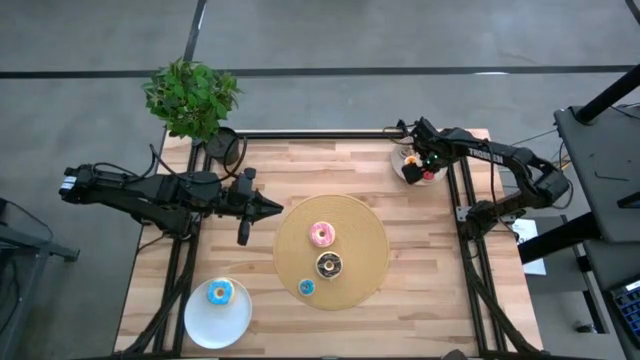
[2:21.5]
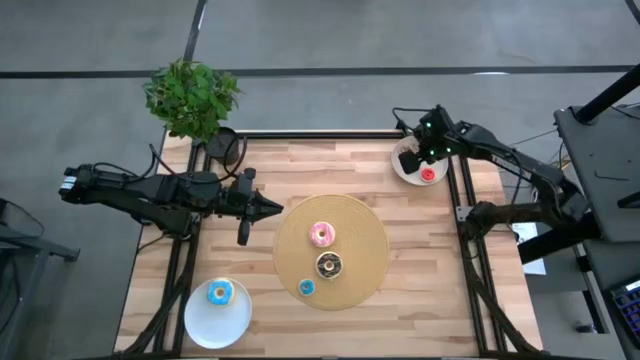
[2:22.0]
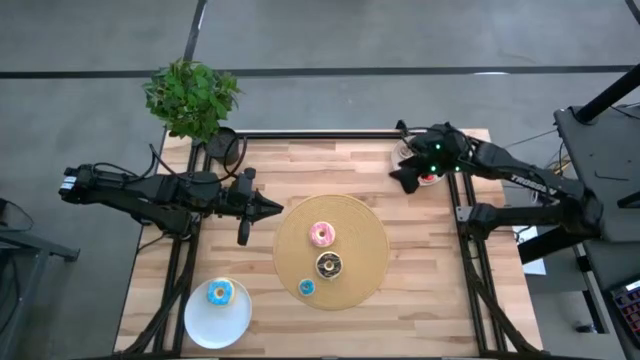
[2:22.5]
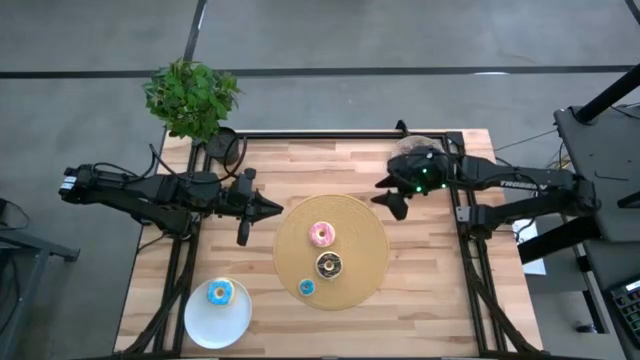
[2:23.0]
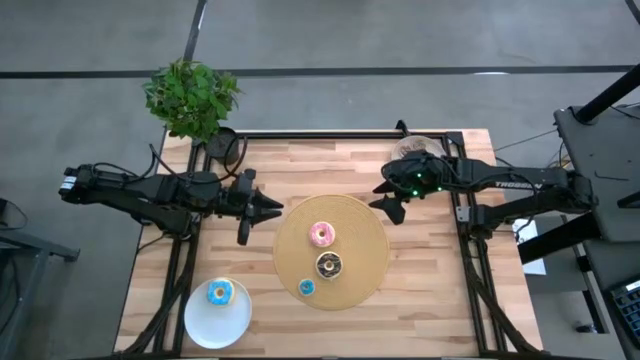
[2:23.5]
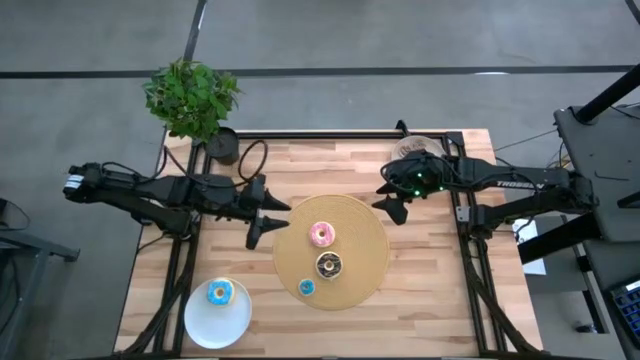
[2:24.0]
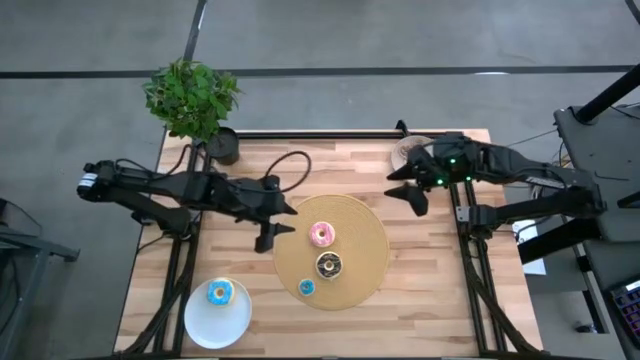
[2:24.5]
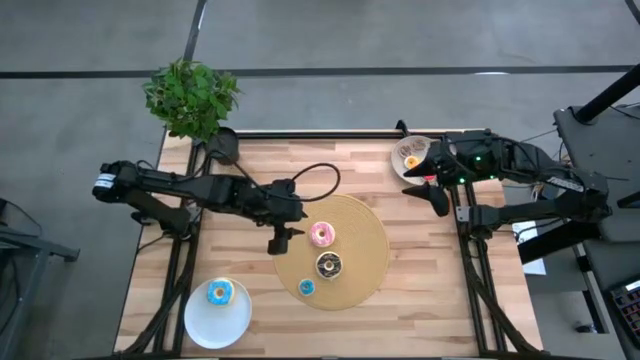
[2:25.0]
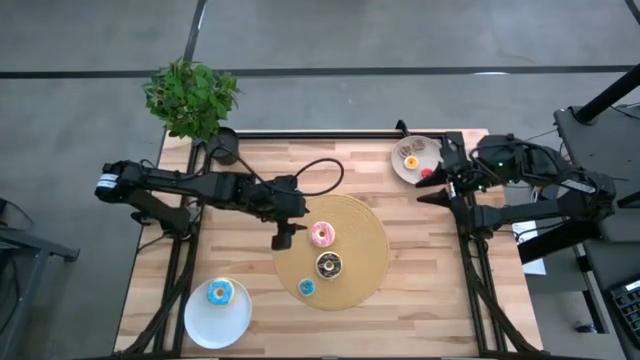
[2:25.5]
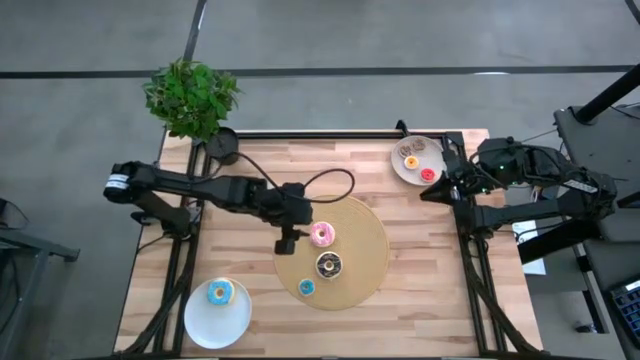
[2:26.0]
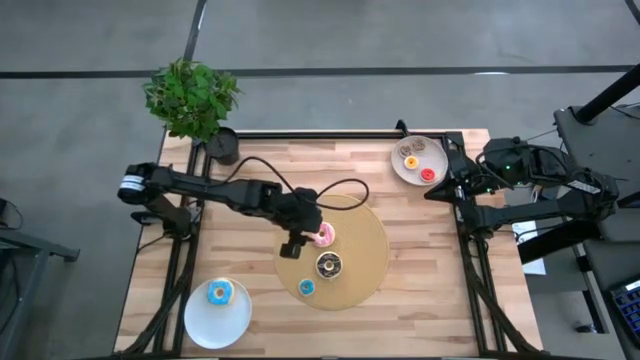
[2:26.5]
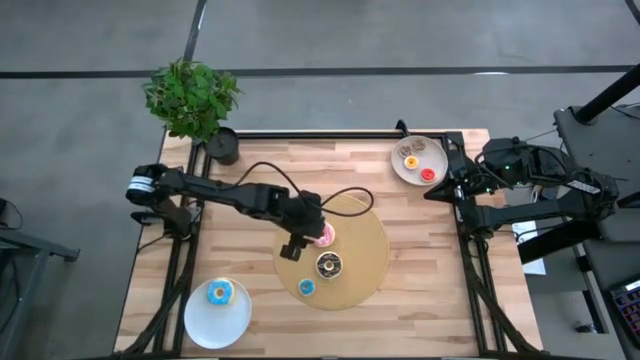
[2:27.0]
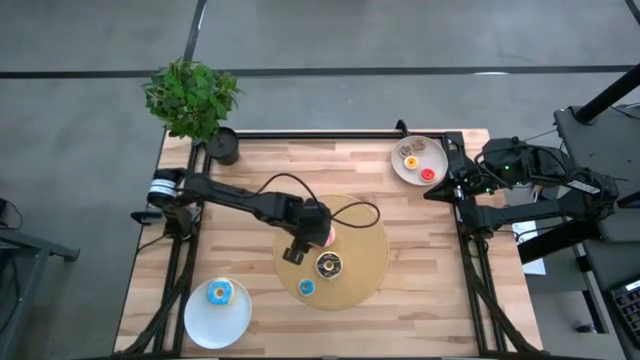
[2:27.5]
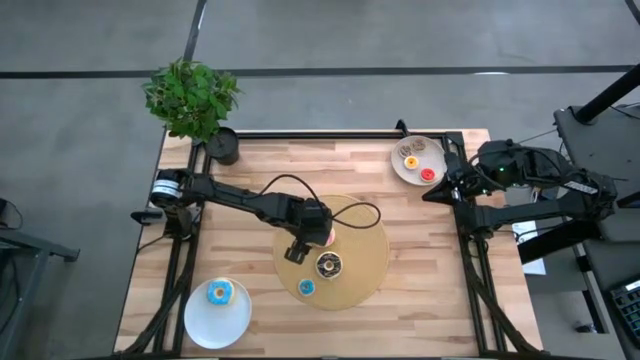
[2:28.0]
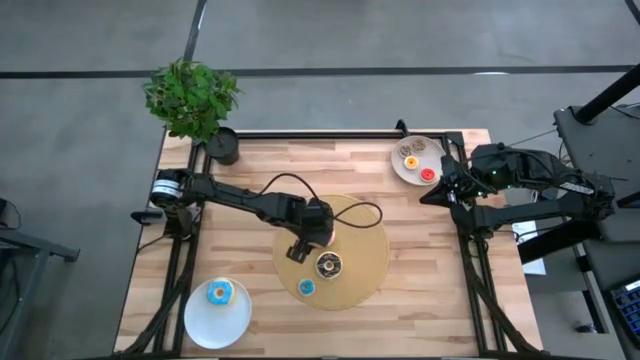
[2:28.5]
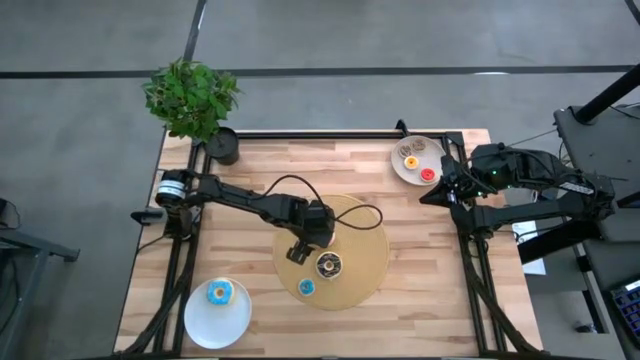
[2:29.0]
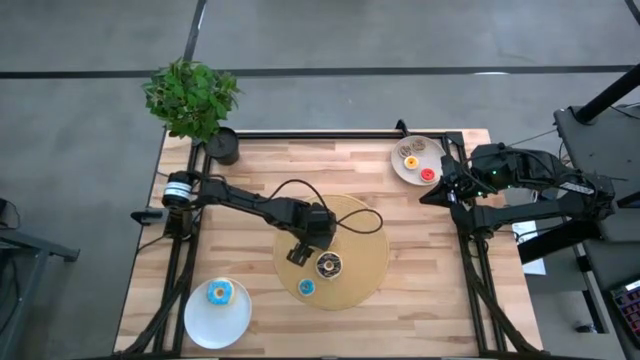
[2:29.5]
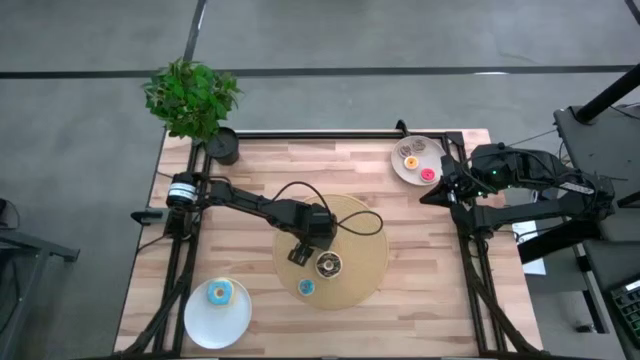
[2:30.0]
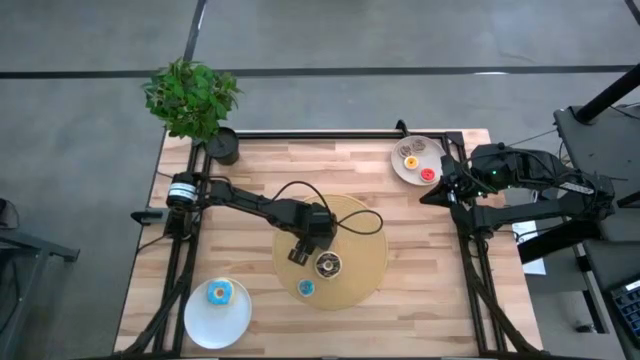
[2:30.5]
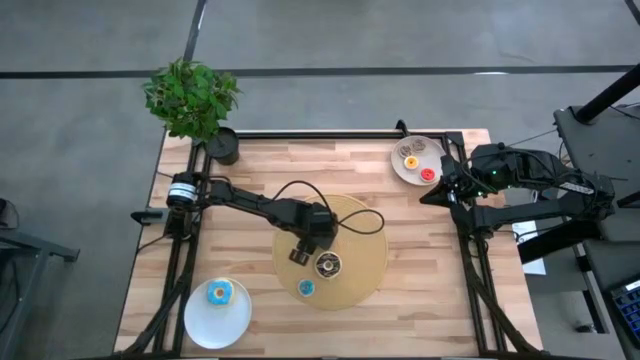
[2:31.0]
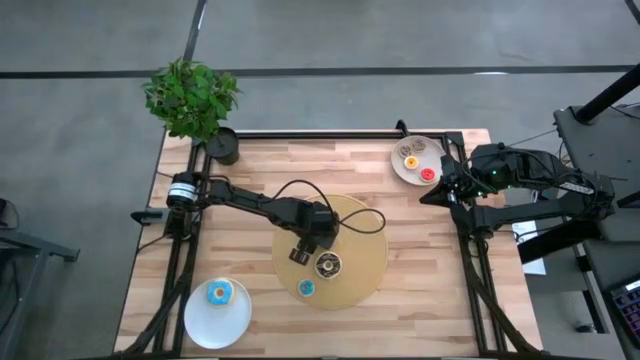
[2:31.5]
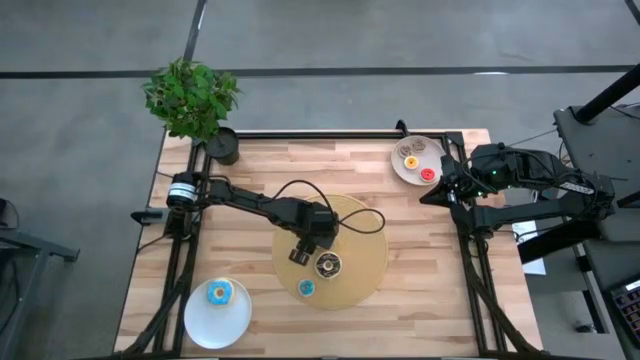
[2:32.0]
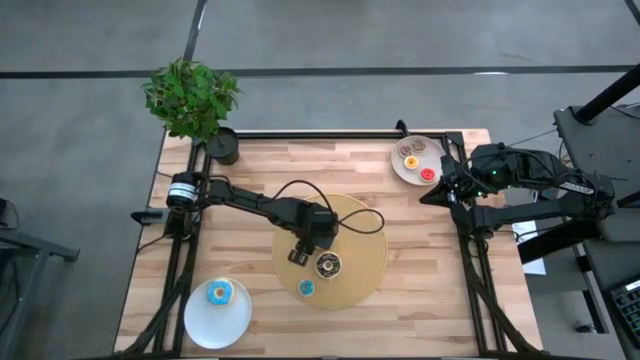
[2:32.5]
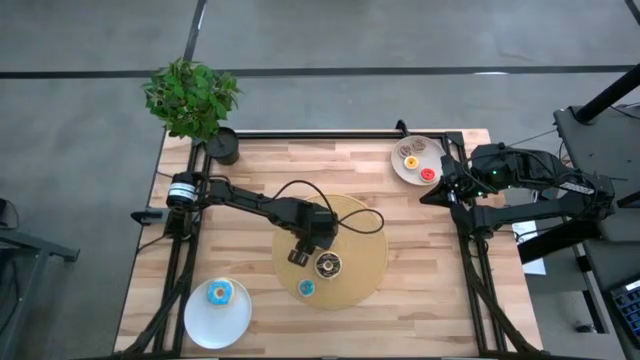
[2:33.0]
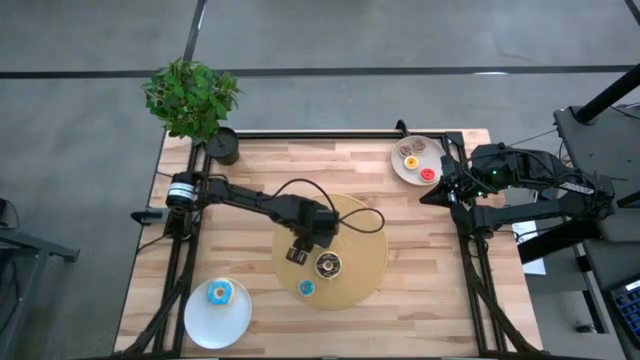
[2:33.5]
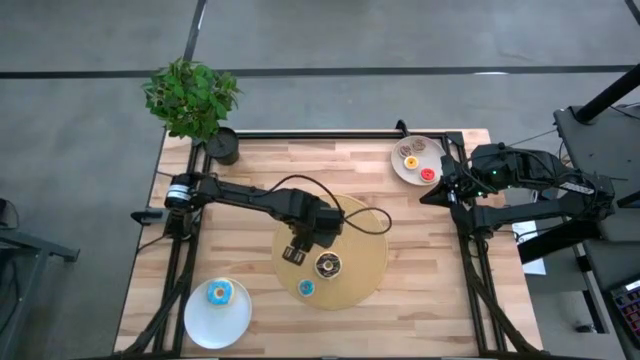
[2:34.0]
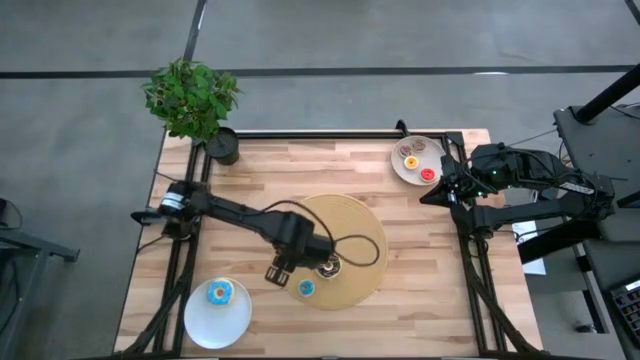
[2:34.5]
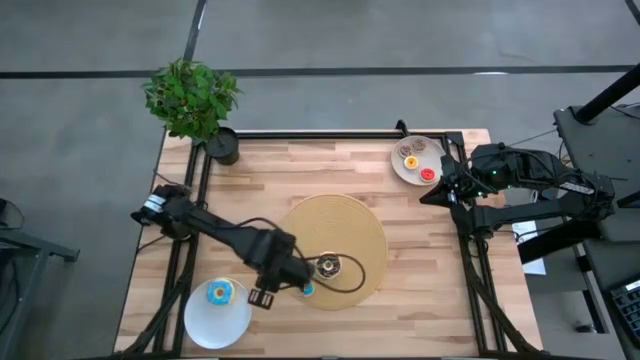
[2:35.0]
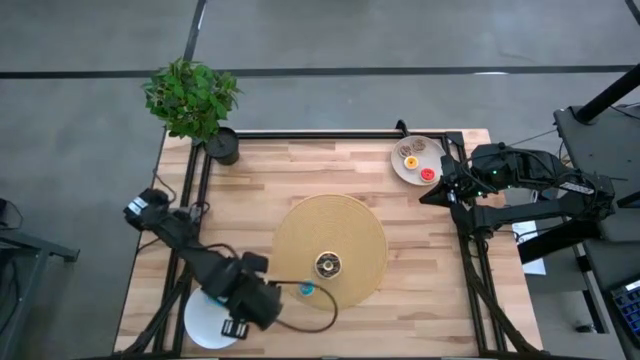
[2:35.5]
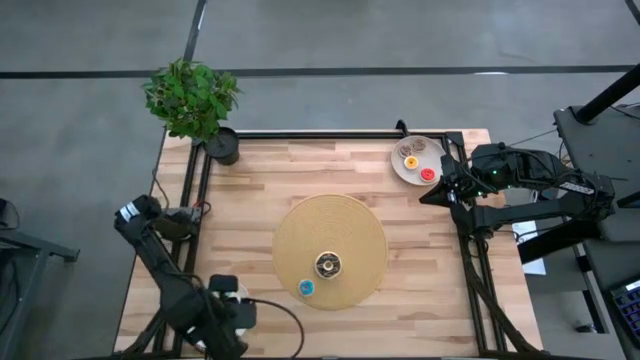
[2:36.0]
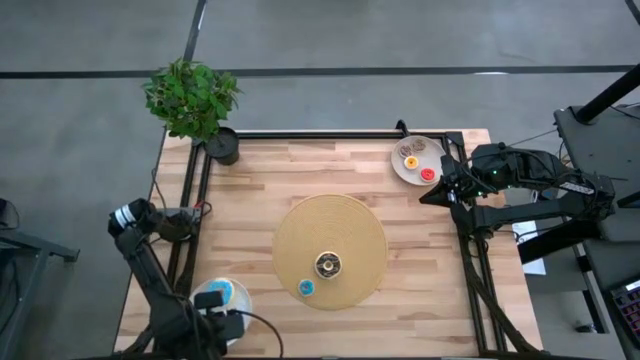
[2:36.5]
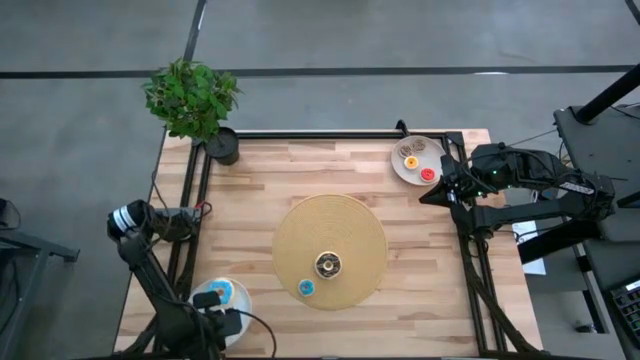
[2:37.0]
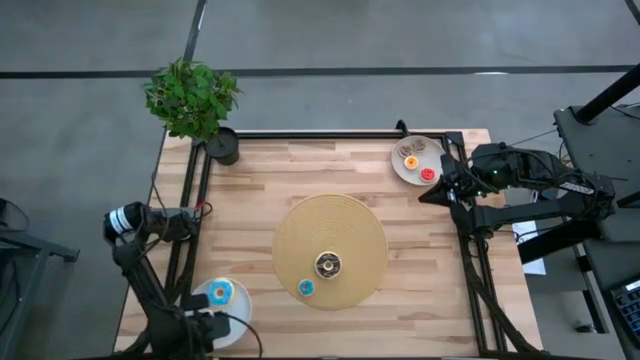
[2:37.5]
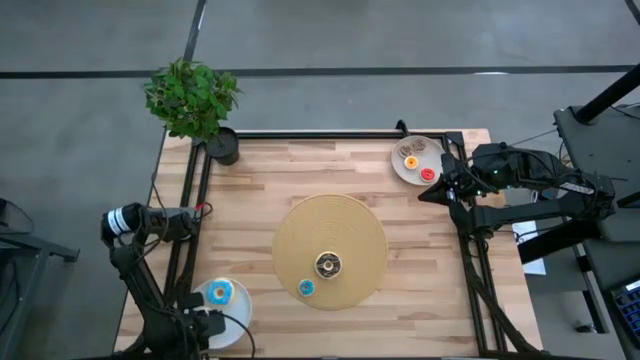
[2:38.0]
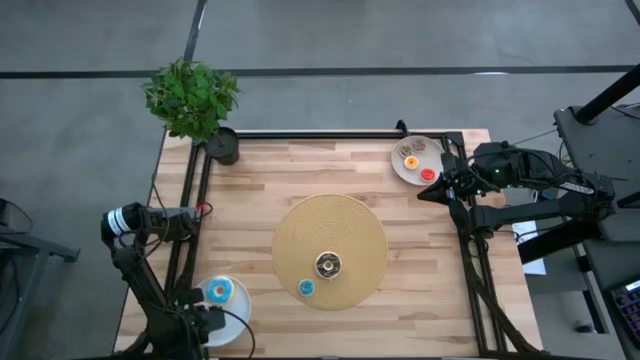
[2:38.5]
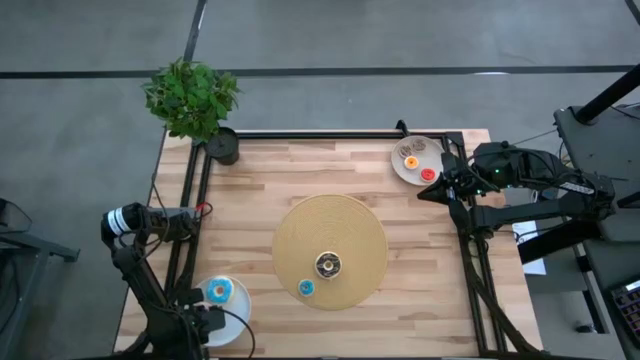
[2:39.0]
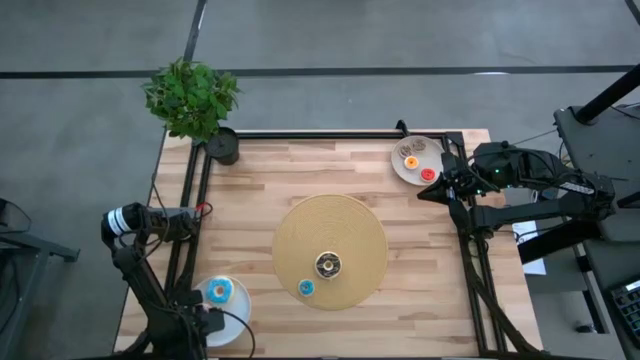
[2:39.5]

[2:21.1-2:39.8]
Task: Pick & Place donuts
Put the large pink donut on the white plate

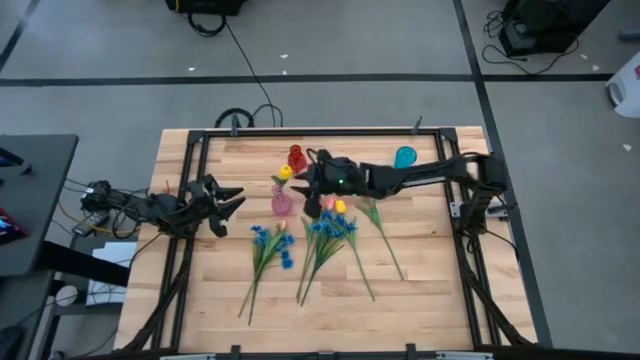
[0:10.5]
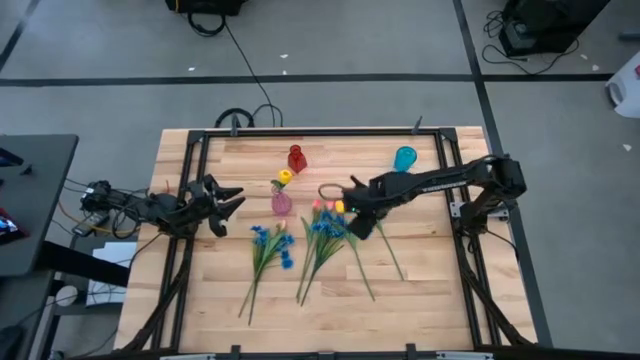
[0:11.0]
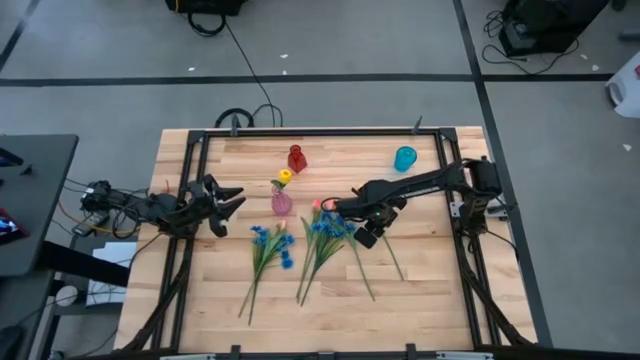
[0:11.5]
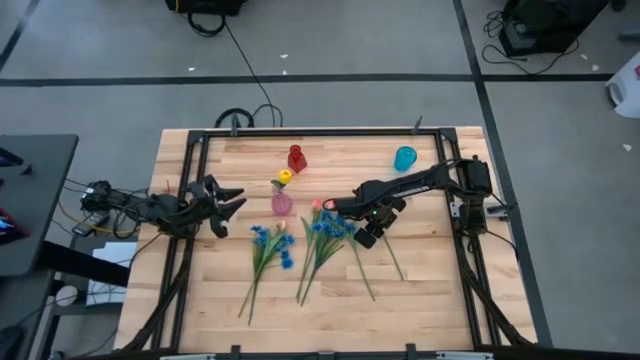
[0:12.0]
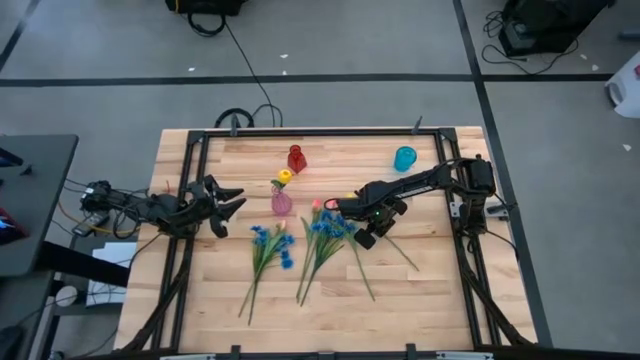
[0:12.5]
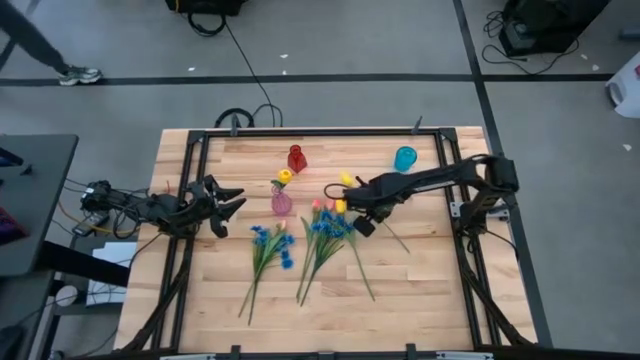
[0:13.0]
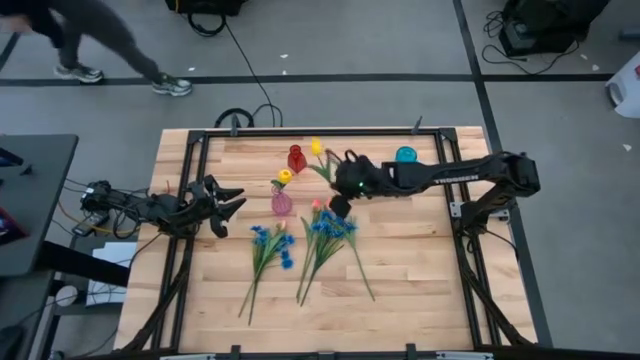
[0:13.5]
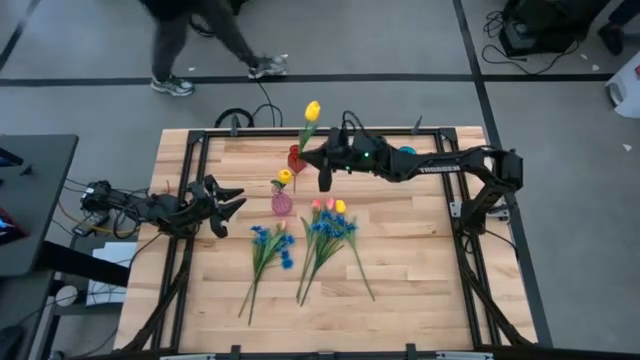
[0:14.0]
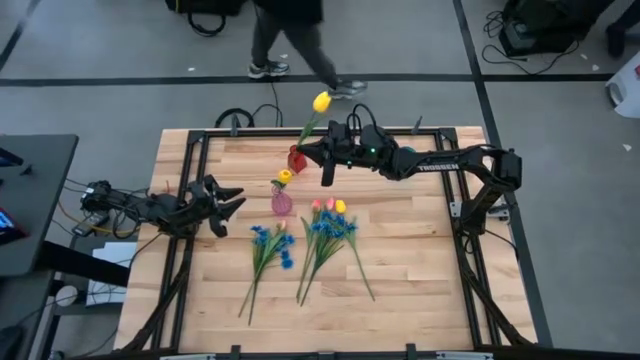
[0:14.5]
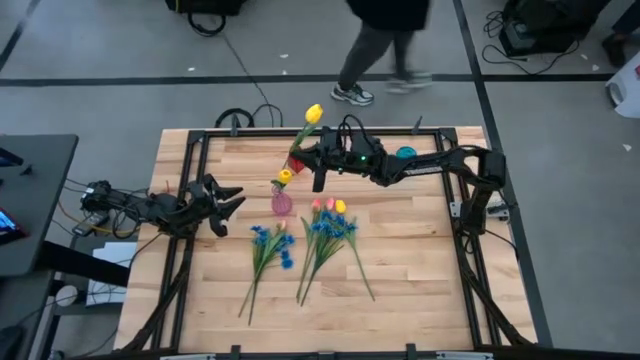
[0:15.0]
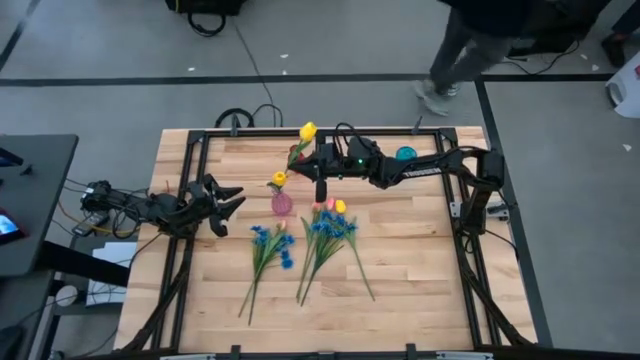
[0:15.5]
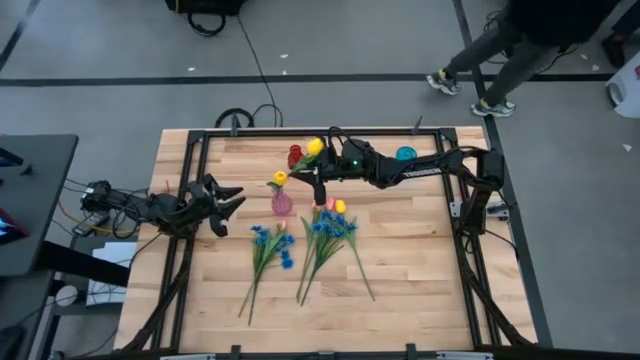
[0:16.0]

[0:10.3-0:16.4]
Task: Sort flowers into vase by color
Put the right yellow tulip into the pink vase
